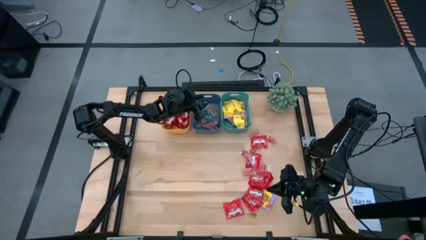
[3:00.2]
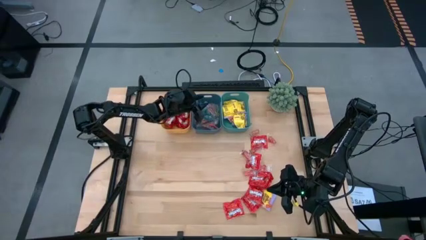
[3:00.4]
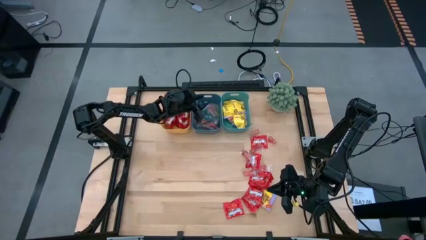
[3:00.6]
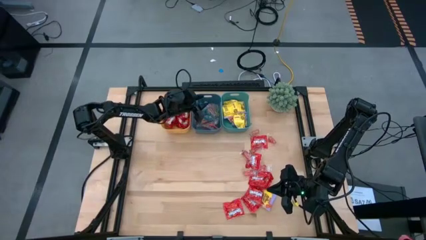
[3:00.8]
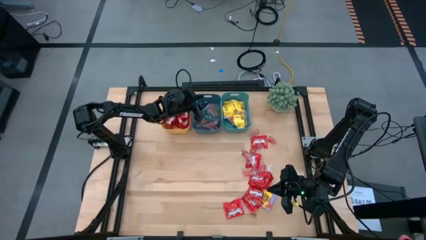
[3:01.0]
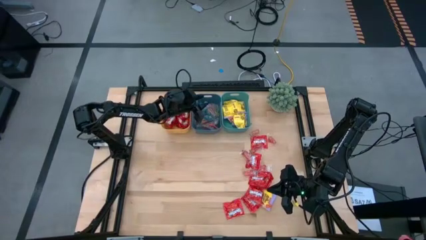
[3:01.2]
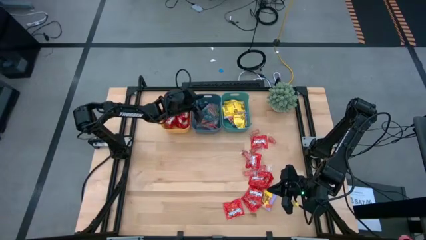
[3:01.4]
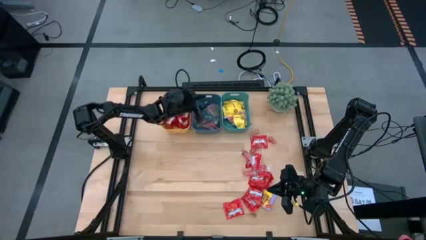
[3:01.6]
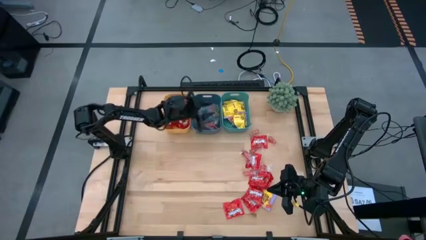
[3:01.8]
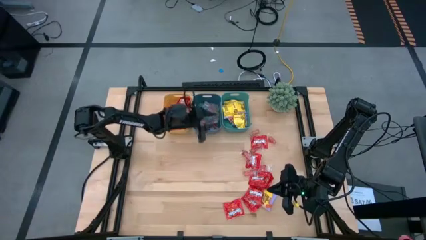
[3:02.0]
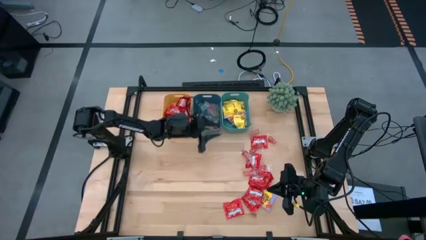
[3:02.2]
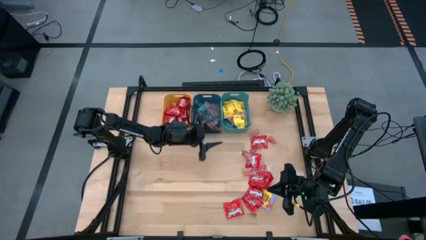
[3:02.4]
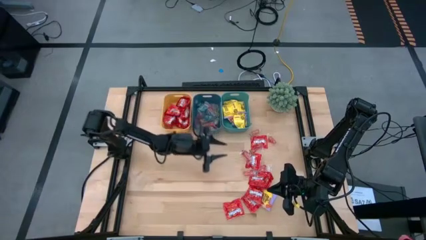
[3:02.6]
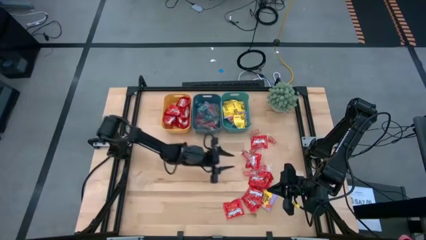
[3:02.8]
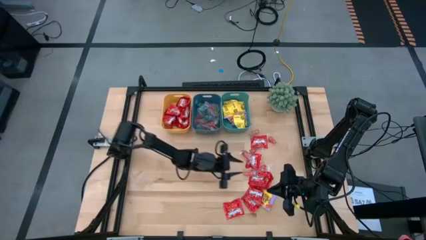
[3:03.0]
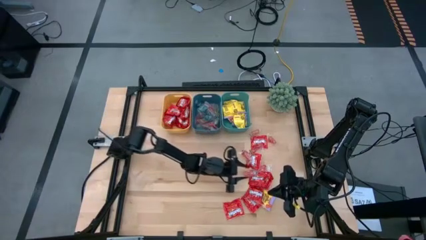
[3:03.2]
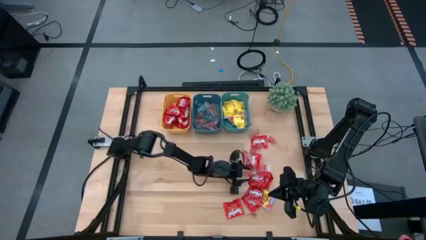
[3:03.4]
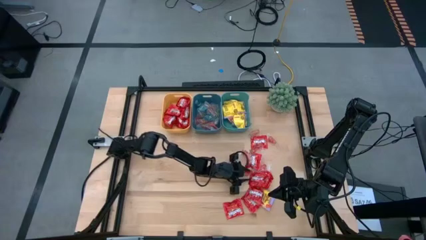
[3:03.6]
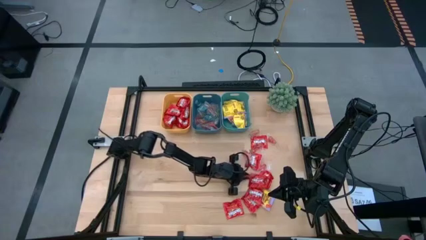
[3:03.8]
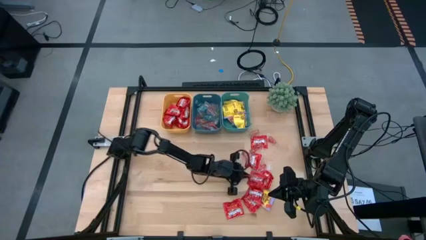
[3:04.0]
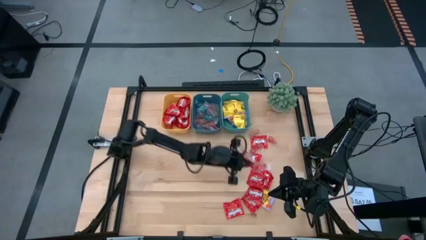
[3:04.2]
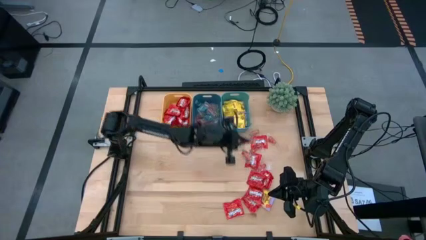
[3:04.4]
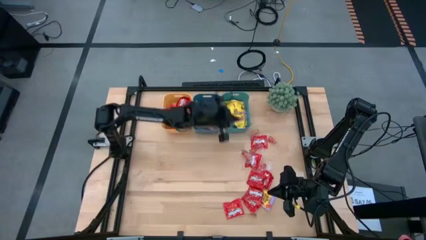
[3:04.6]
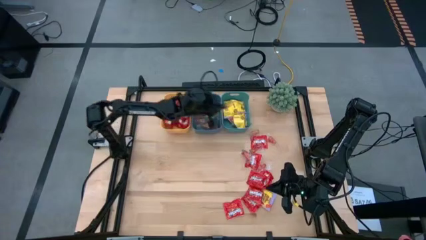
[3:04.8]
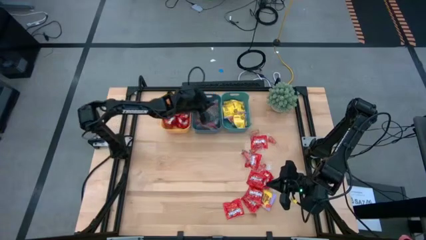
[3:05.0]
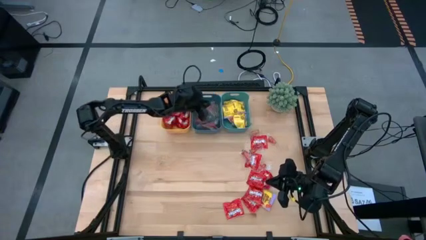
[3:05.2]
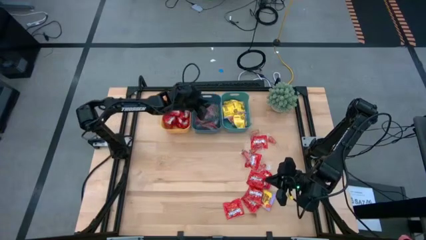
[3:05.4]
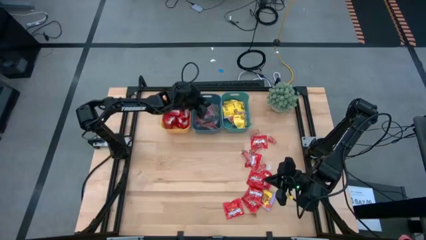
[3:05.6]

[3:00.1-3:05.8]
Task: Sort candy
Put the transparent red gummy into the blue bin

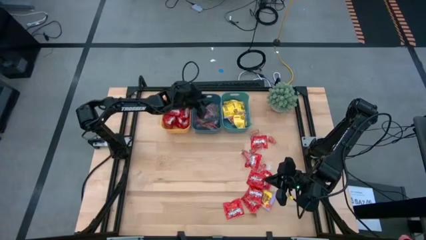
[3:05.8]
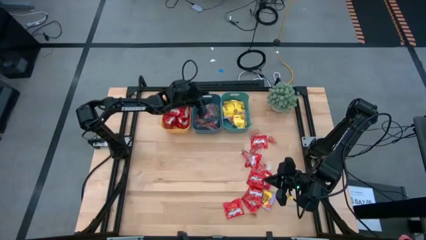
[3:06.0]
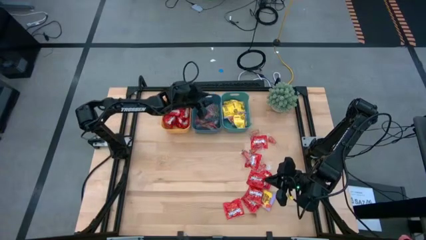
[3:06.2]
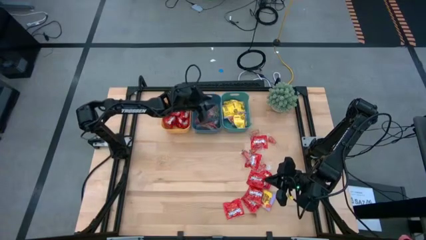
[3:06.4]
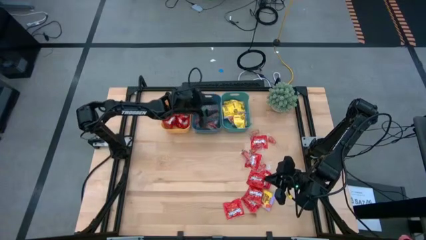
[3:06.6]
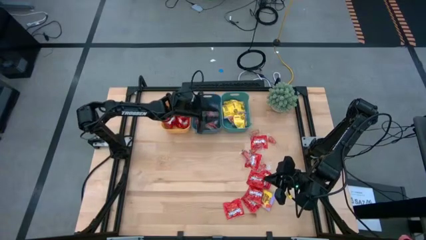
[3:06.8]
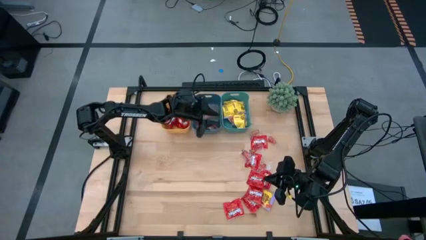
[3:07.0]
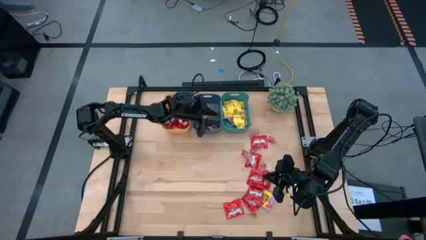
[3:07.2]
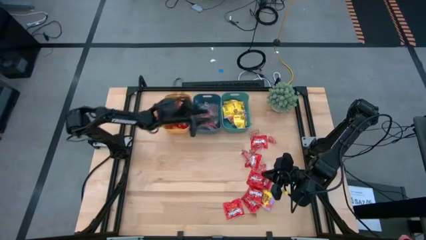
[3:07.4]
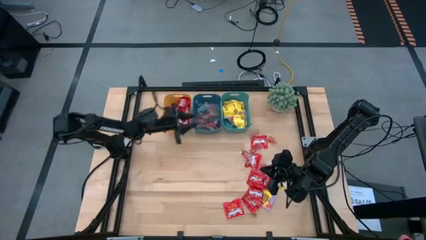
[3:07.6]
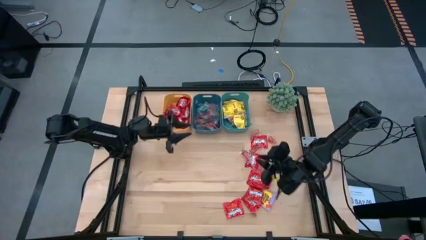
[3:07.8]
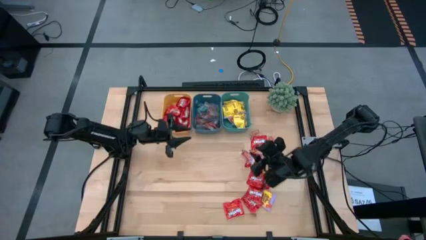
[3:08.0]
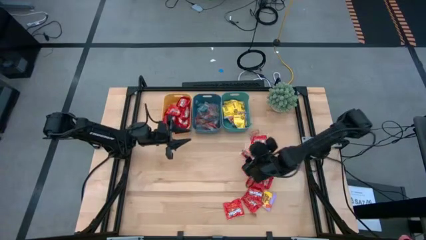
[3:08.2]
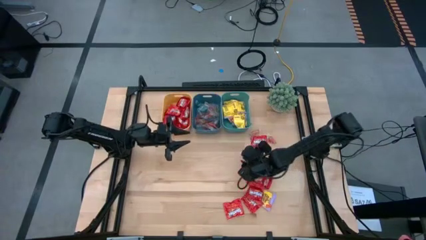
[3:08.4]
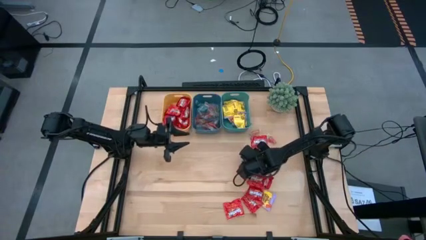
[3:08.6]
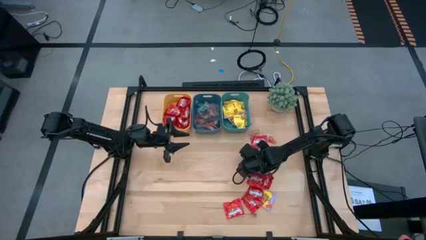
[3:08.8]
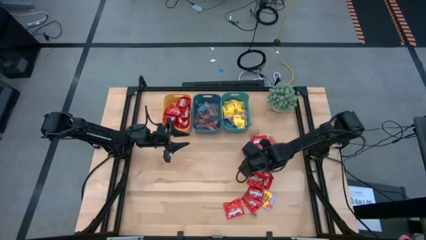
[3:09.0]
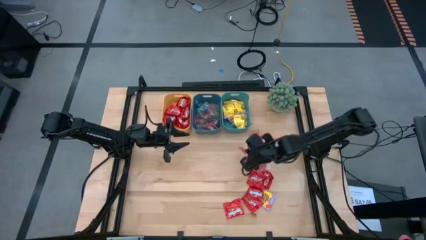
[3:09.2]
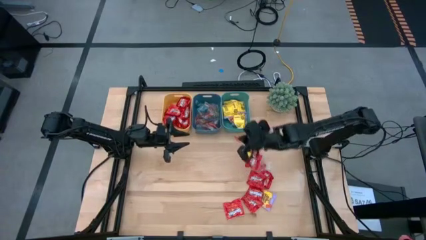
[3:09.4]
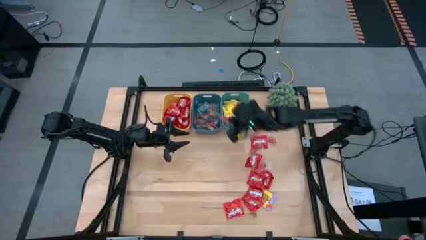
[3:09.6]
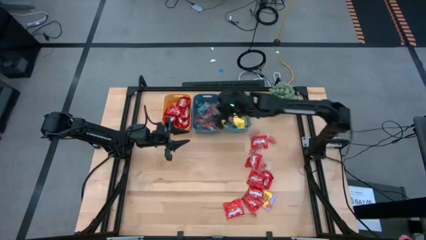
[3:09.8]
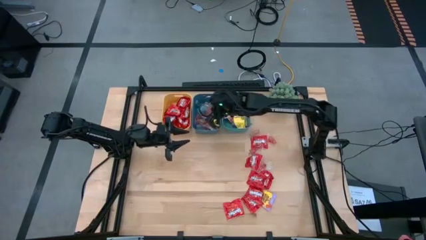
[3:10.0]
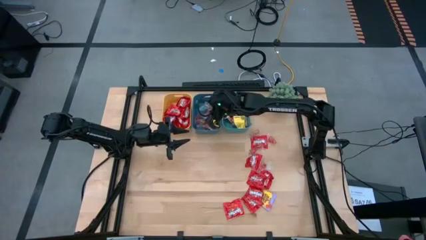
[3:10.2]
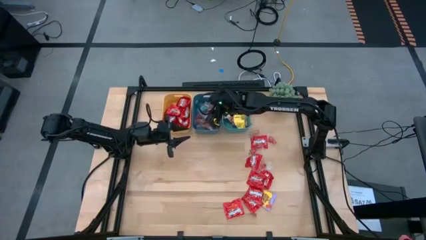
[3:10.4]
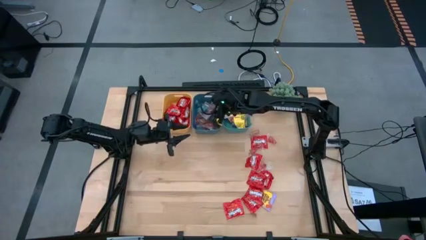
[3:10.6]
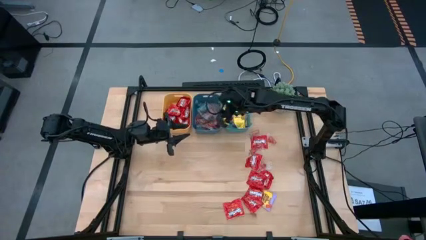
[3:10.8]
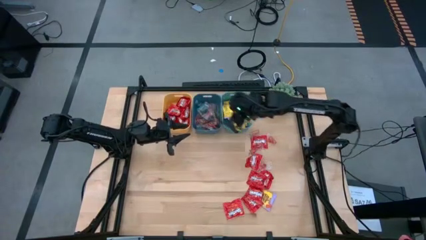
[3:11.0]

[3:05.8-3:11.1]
Put the transparent red gummy into the blue bin

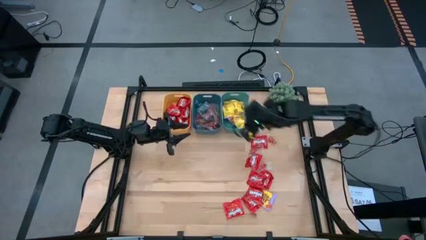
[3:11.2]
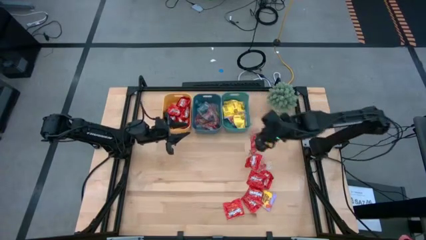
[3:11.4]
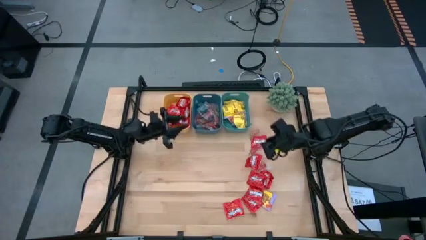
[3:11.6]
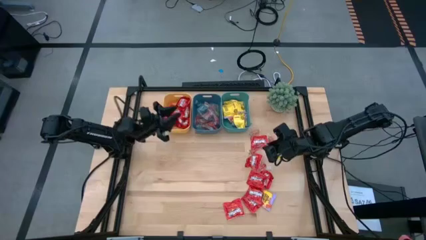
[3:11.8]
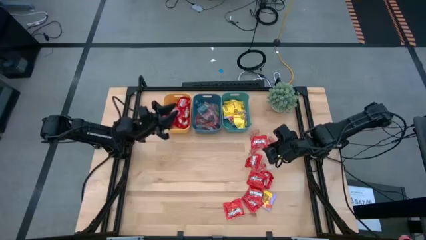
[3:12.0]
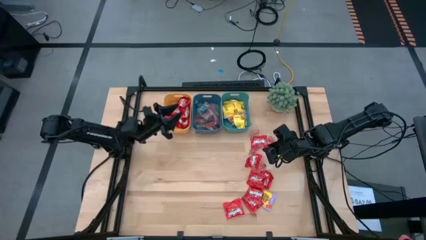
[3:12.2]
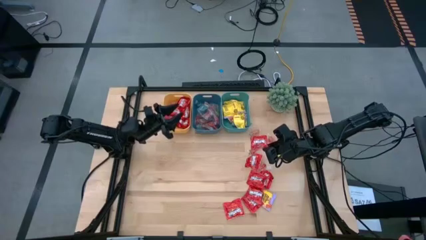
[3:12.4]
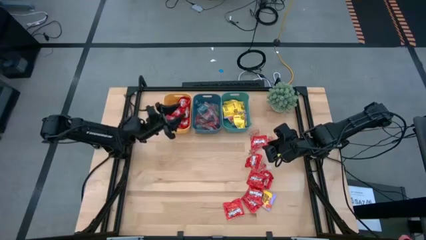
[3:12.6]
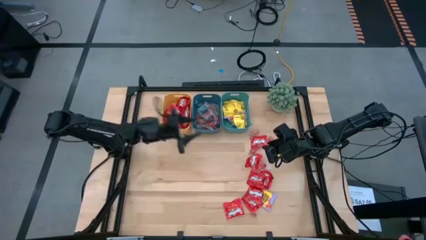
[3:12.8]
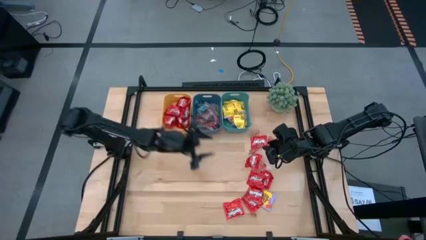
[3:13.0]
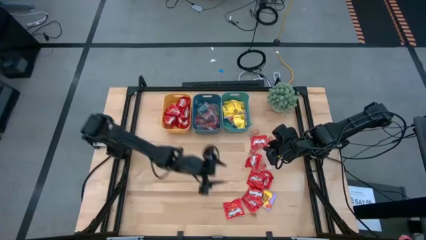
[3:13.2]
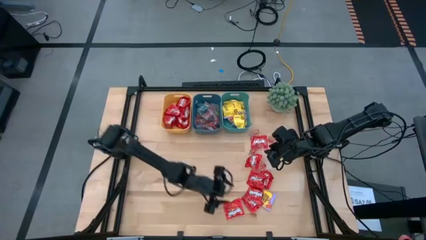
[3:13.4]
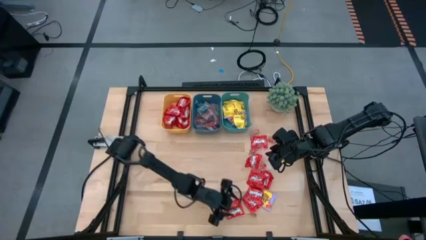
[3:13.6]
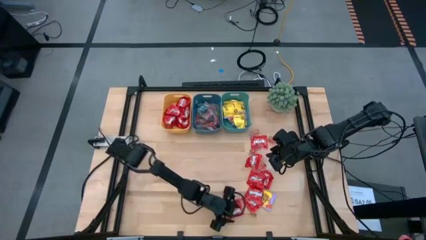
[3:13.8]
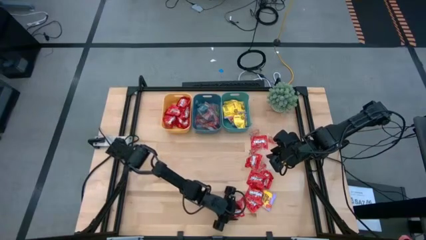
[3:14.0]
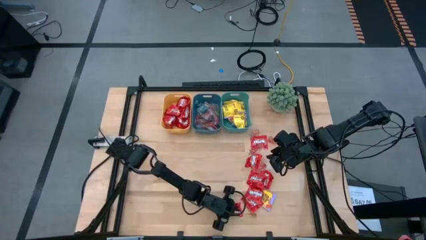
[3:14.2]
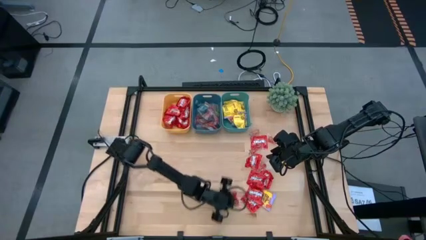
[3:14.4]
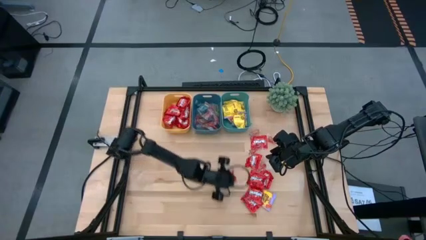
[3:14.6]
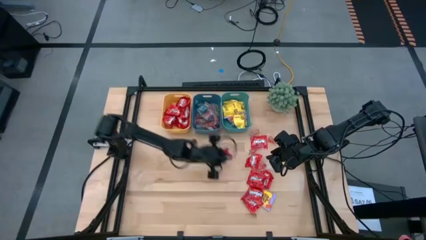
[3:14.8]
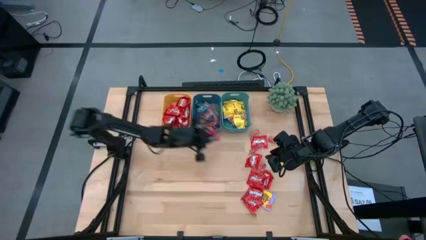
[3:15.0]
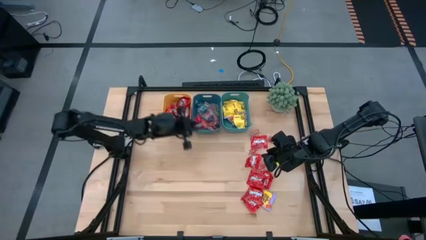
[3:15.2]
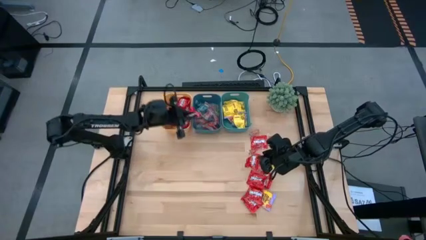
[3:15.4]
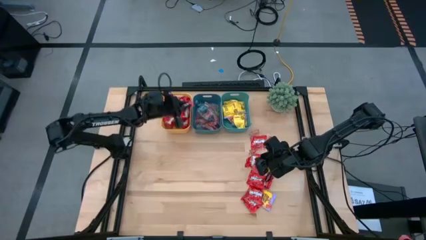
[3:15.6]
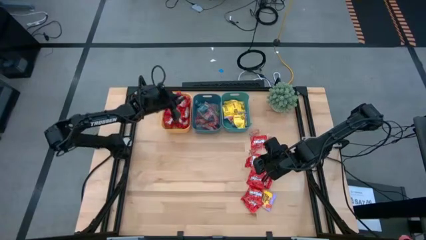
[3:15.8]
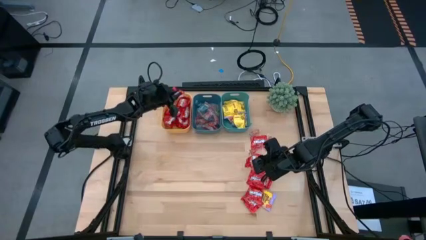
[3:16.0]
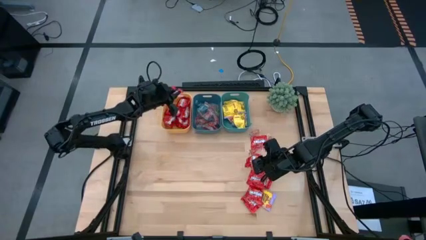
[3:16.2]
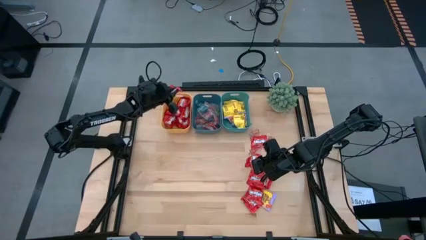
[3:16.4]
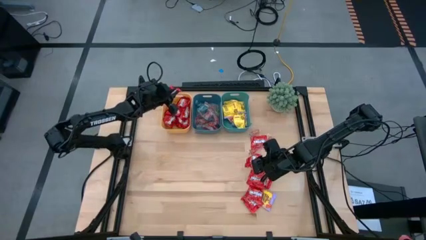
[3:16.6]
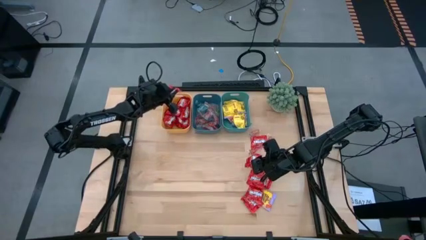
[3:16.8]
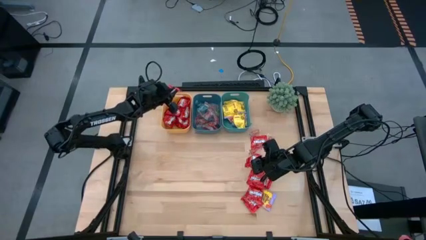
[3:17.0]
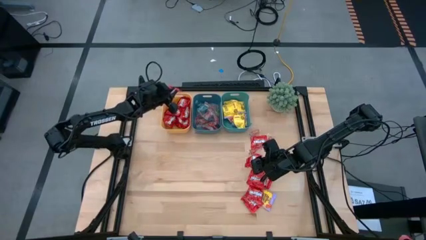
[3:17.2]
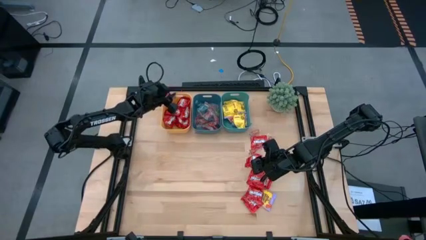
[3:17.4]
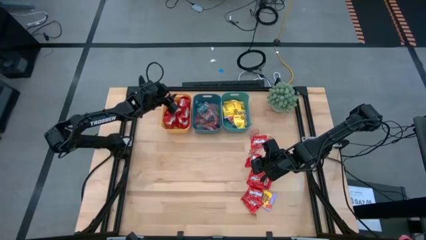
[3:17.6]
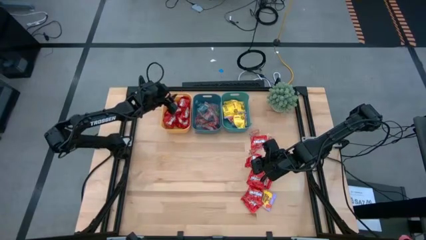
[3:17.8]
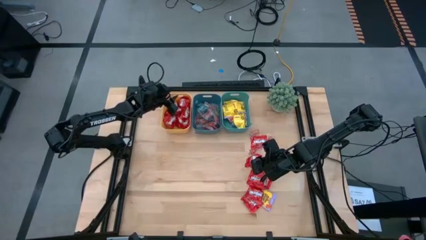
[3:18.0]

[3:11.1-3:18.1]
Put the red candy into the yellow bin
